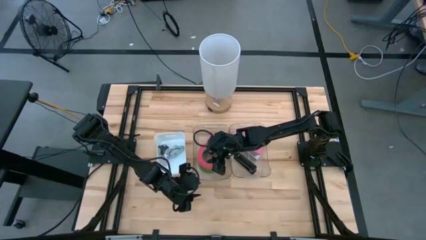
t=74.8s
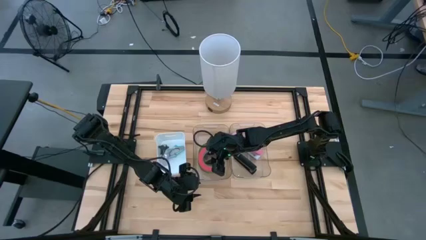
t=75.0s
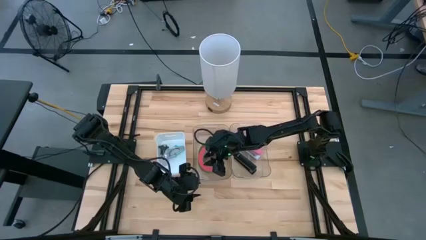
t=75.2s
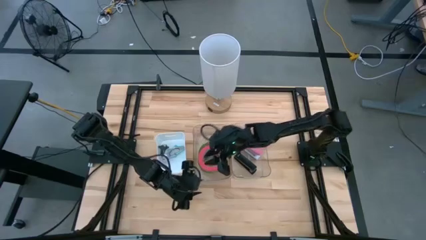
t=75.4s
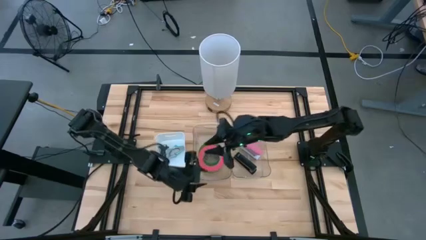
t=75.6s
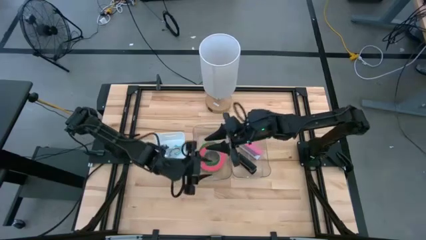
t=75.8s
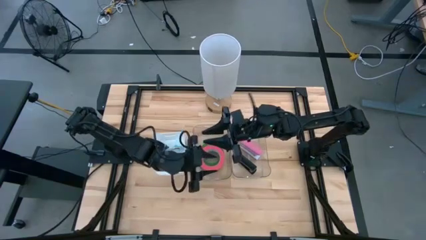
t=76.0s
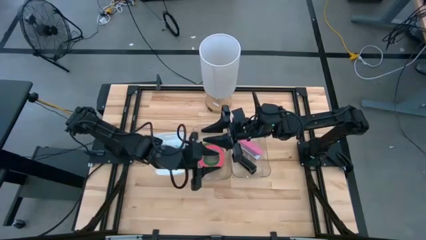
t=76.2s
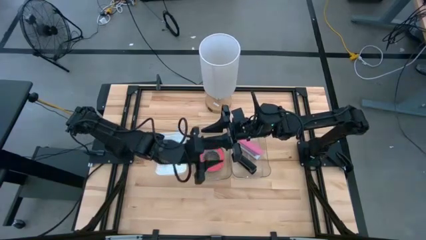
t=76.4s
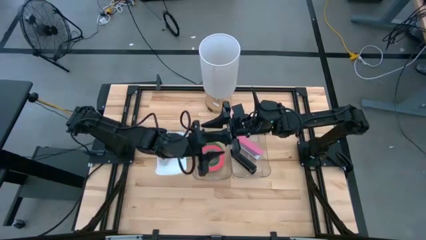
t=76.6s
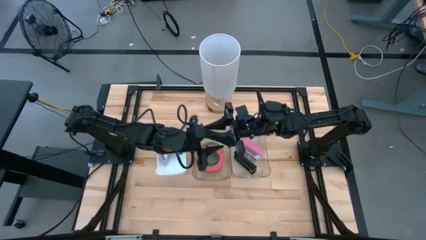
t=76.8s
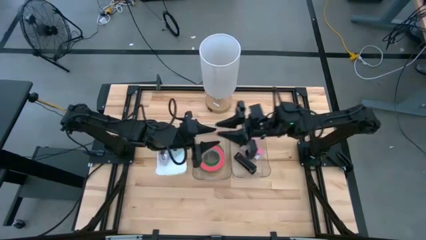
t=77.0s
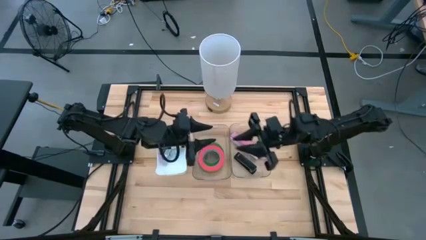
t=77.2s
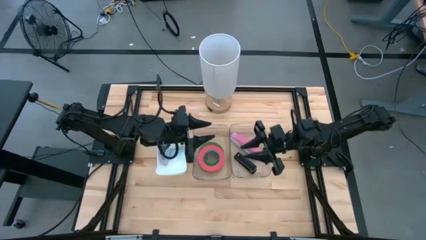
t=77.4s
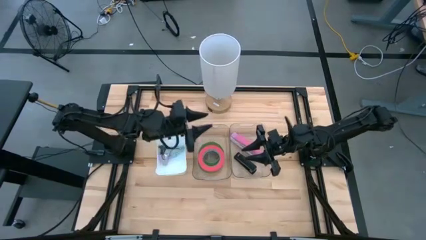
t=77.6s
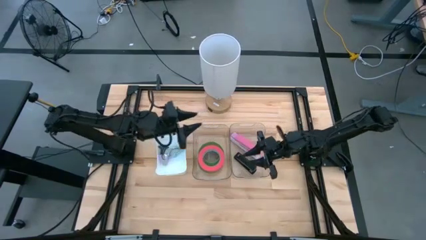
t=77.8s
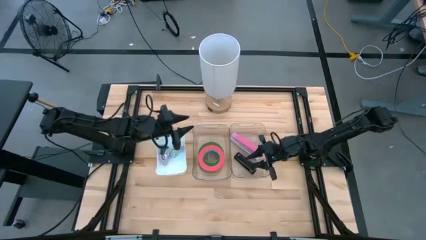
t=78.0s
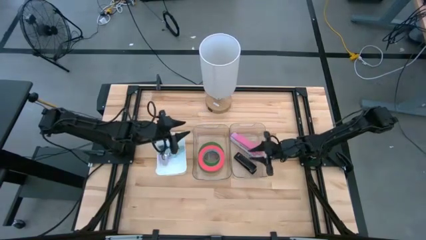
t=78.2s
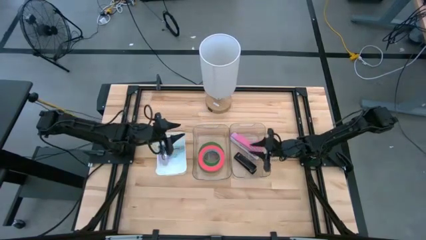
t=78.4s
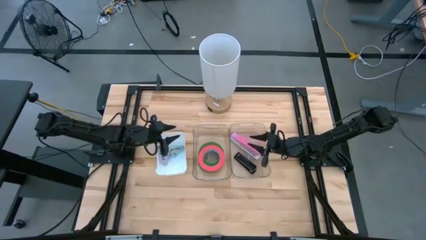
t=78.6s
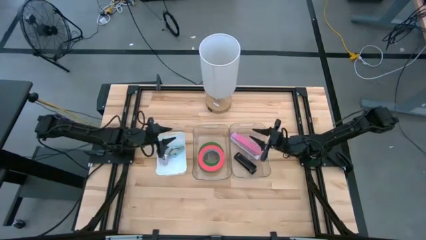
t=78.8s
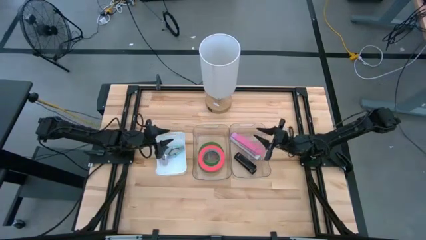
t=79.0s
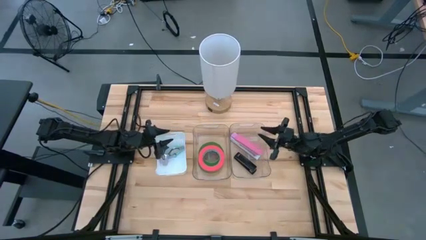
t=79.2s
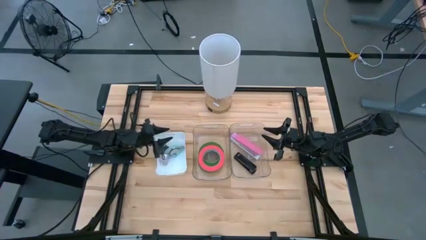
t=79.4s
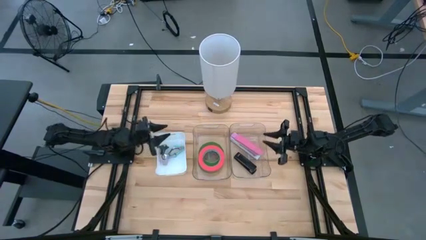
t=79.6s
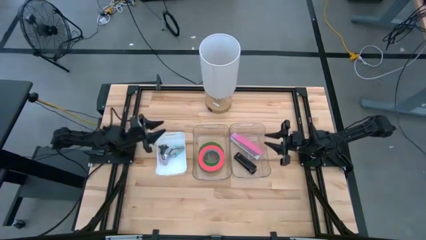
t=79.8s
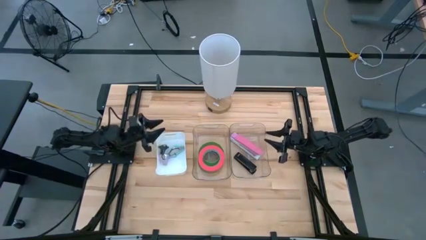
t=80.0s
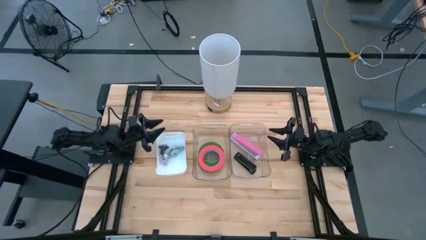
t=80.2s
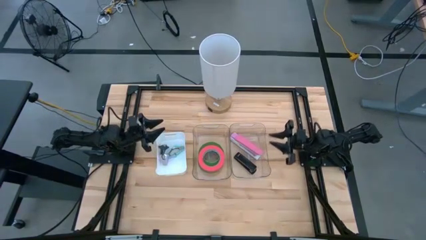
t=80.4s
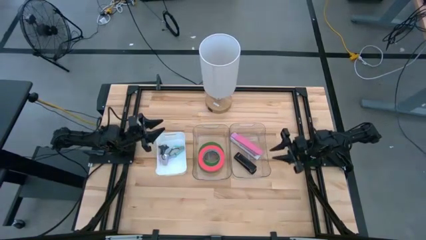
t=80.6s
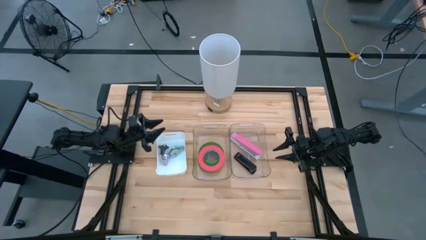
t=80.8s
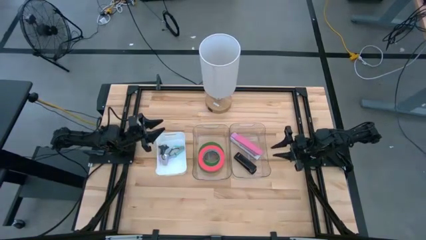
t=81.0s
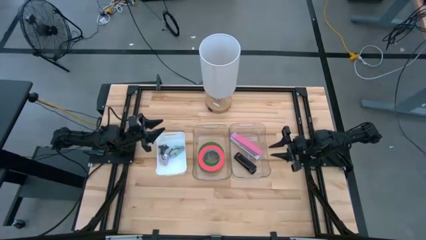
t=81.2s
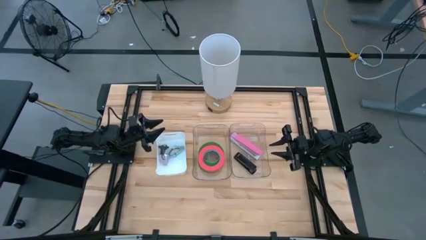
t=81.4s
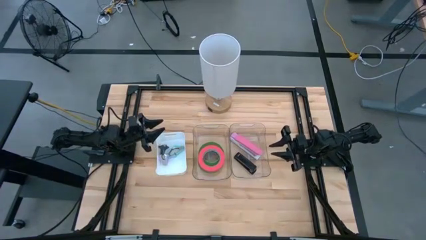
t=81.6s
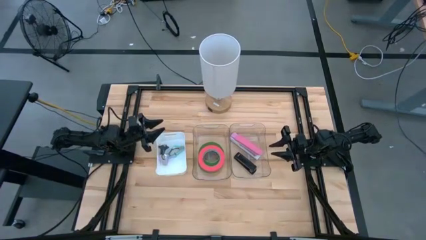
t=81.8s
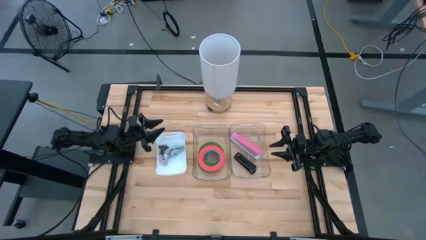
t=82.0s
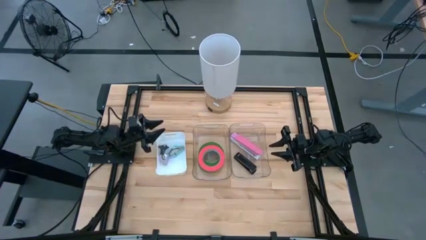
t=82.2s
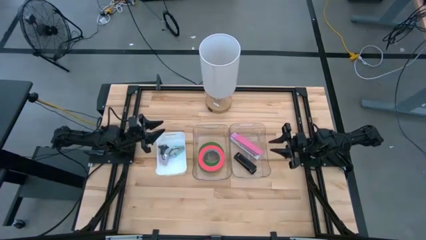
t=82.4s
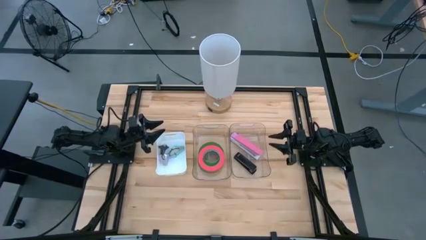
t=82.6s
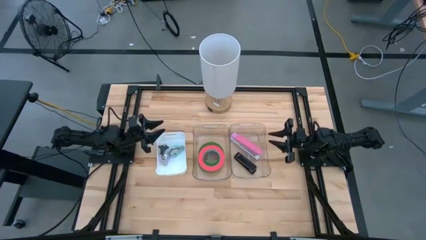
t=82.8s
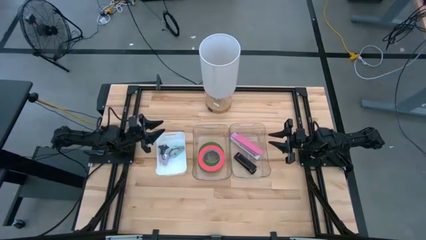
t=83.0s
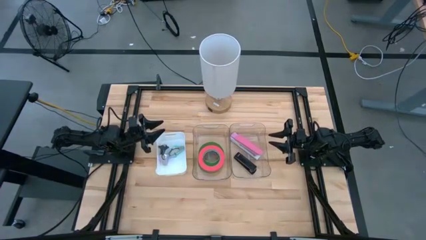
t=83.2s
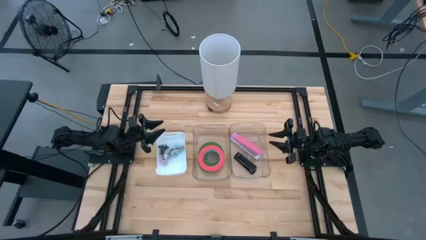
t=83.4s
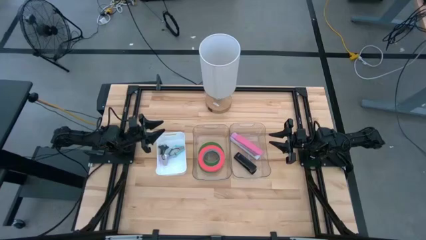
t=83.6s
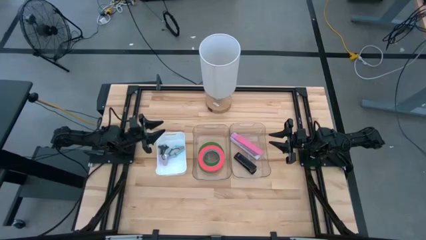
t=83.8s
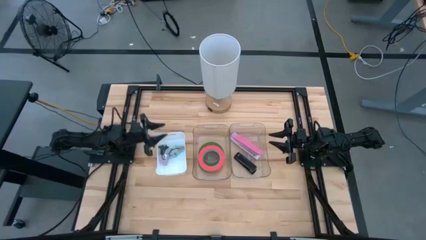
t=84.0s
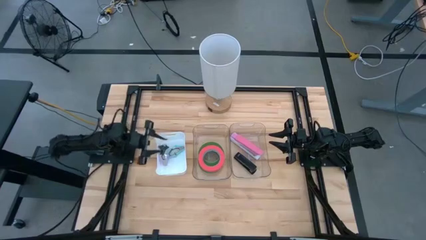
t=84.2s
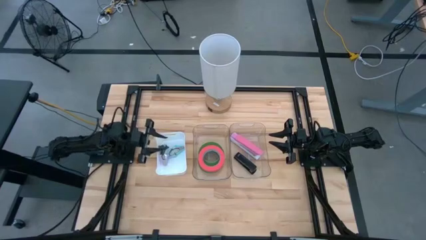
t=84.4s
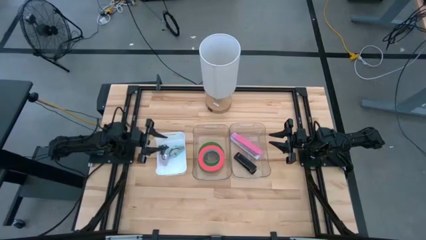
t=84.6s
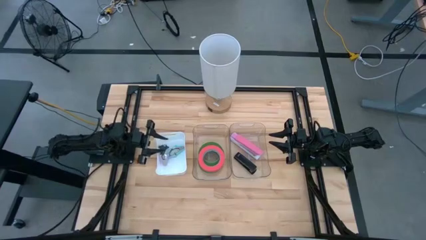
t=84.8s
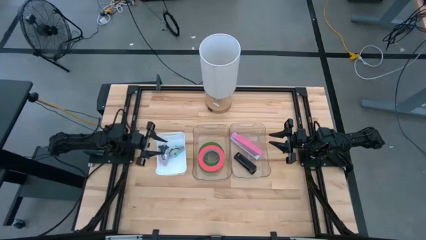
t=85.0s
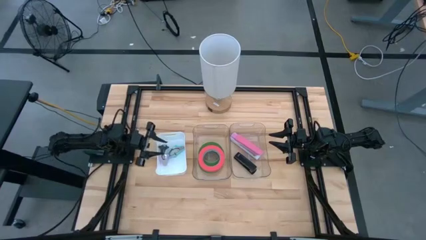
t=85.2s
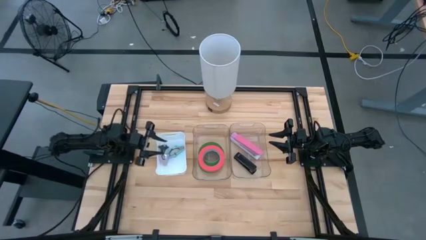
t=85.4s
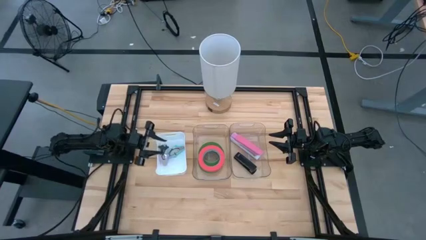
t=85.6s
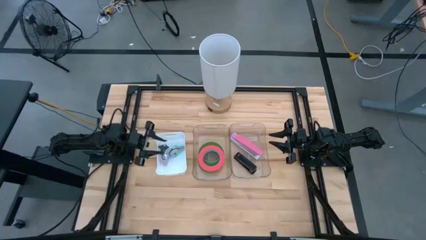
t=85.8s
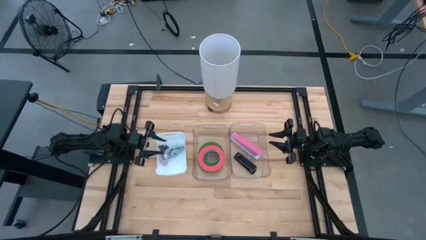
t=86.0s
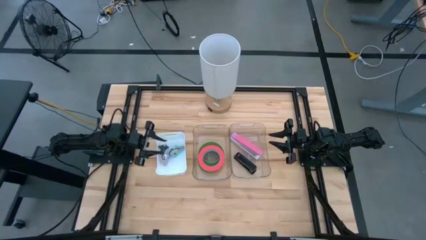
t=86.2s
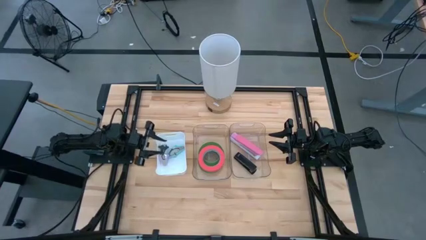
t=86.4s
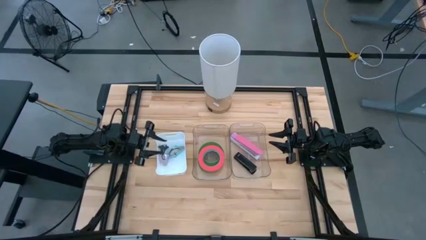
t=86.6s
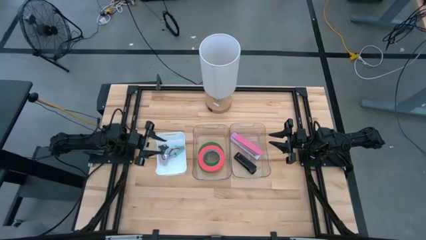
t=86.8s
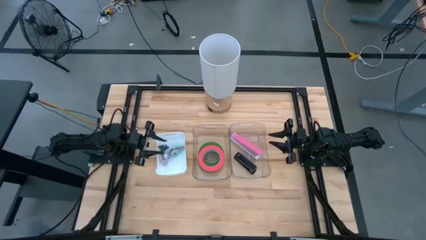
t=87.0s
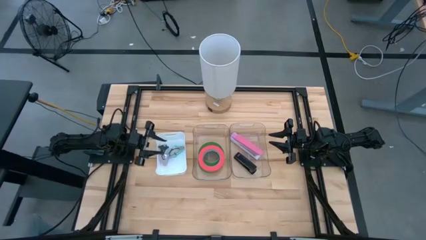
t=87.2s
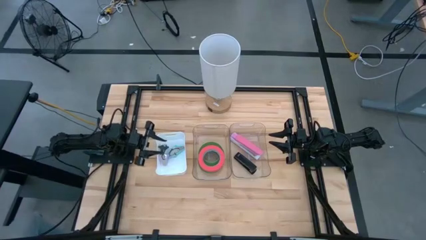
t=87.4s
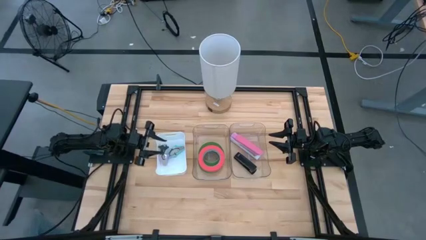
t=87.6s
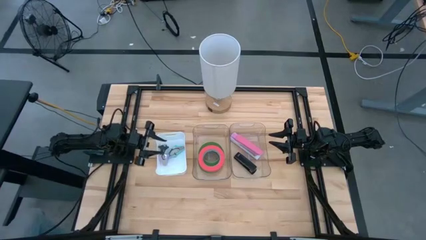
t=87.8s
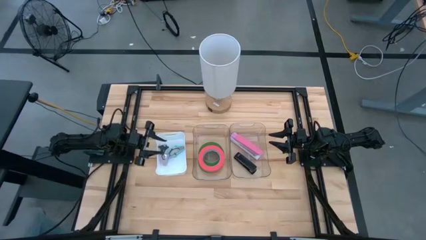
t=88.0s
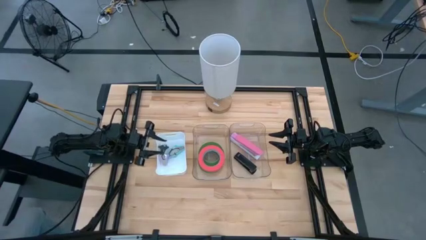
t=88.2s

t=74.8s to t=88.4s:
Task: Pick and place Stapler, Stapler remover, tape
Return to Home Position

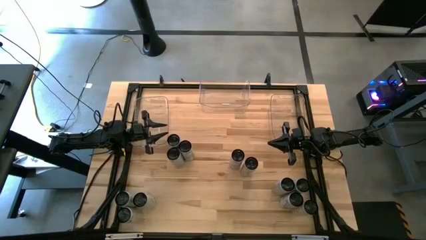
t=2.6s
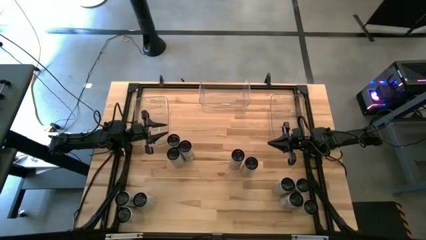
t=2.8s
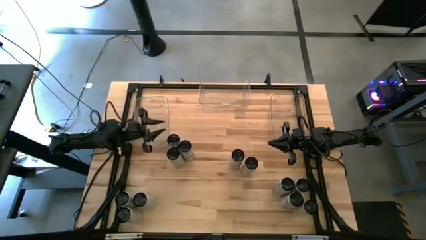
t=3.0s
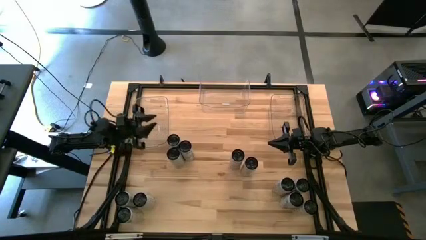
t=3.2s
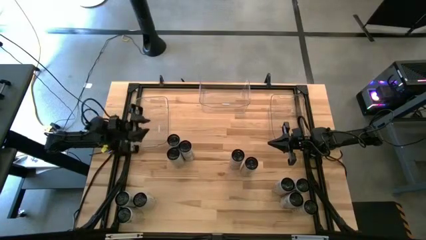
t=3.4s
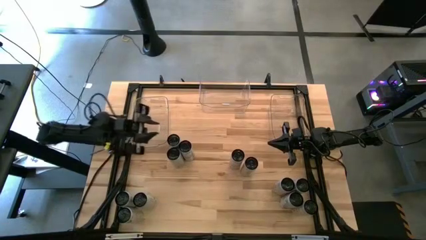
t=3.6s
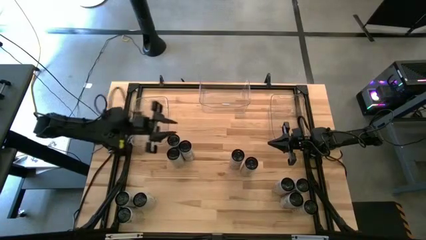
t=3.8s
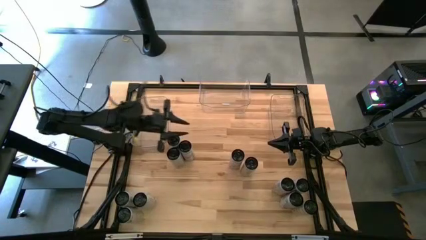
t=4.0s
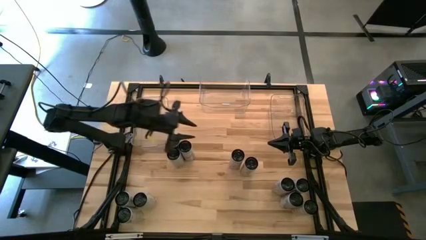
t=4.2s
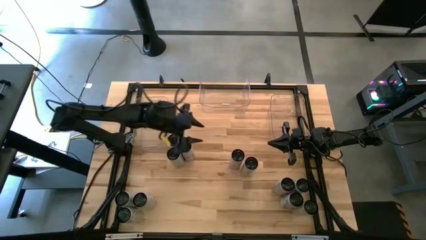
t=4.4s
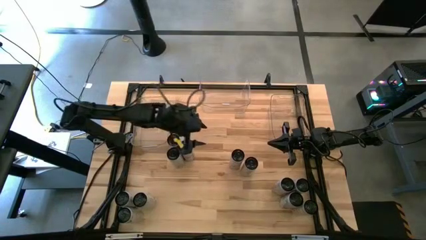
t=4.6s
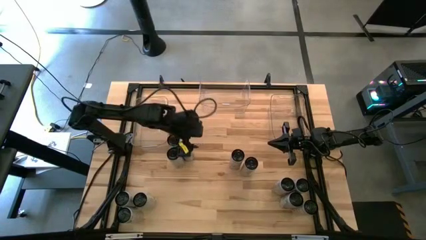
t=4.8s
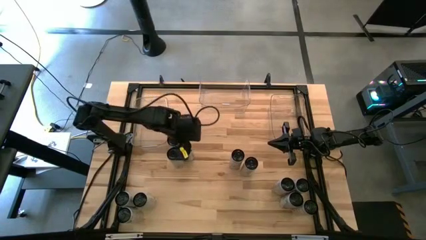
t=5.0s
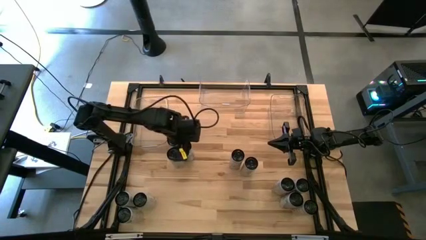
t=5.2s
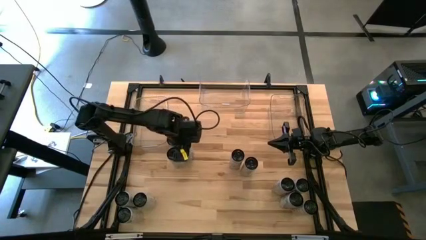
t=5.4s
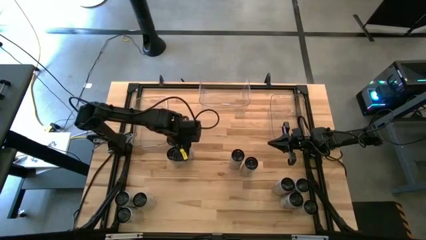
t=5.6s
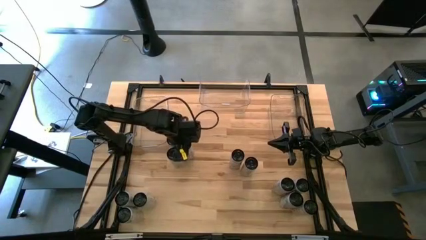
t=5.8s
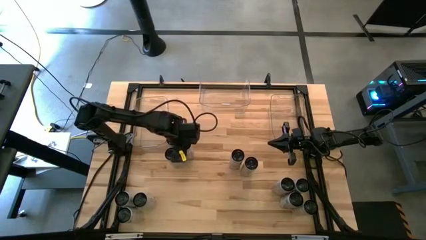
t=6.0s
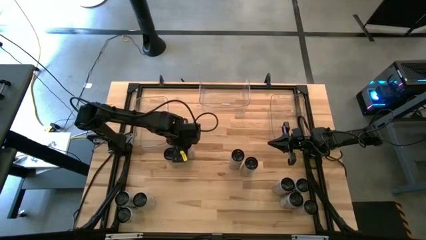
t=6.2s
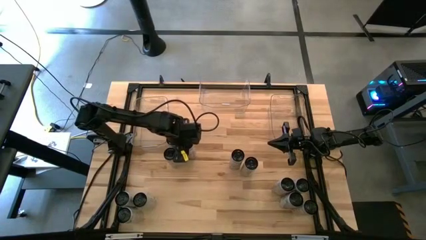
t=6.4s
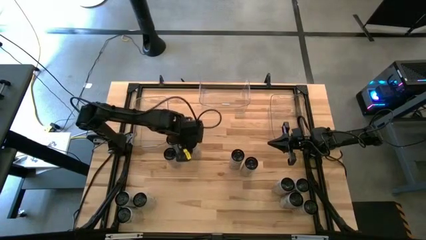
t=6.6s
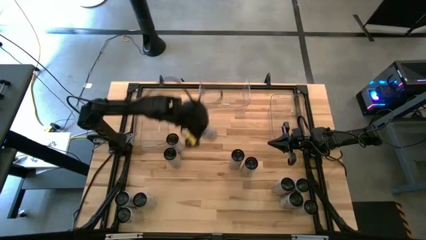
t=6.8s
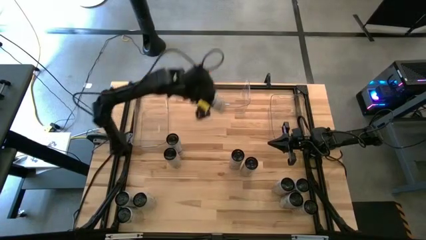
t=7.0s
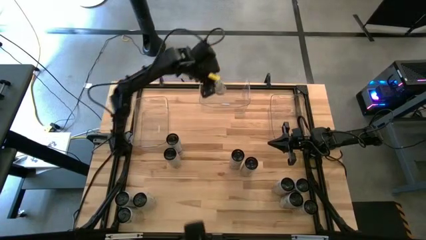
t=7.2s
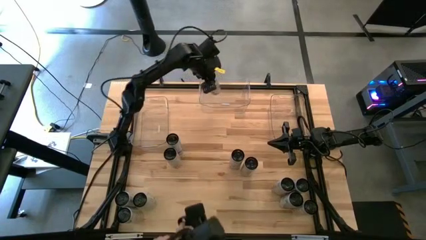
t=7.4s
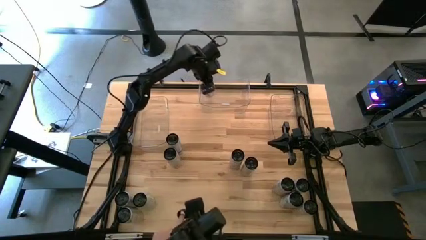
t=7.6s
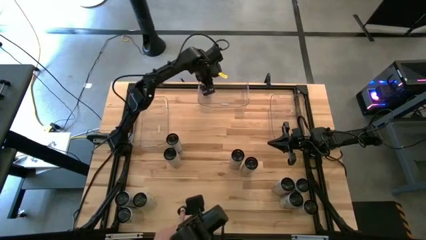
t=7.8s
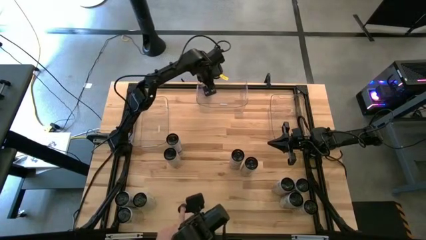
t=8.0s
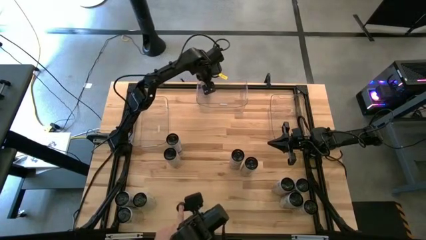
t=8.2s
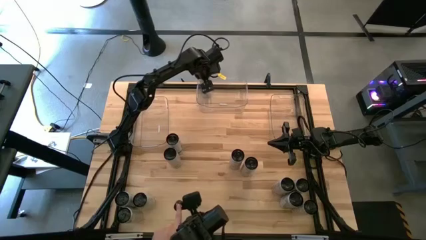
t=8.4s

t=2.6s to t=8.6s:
Task: Sort soda cans
Put the white and blue soda can into the middle transparent bin
